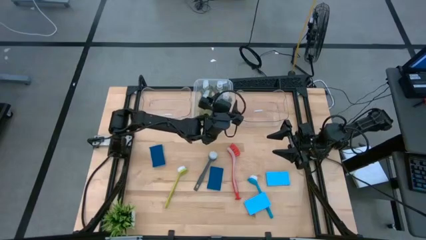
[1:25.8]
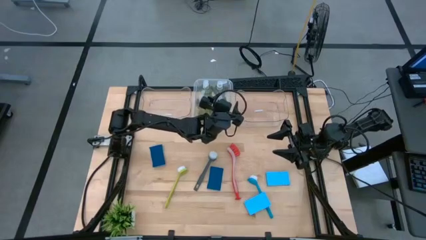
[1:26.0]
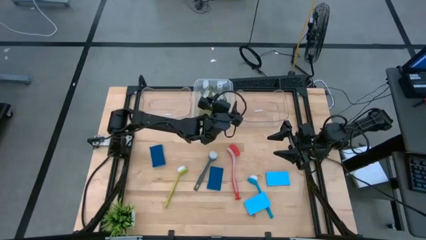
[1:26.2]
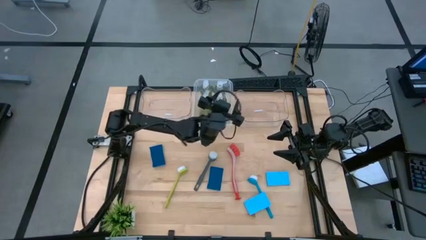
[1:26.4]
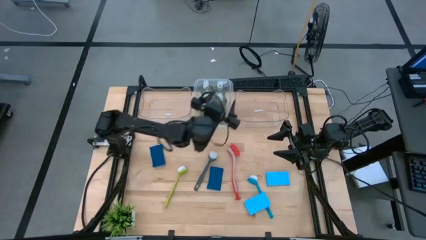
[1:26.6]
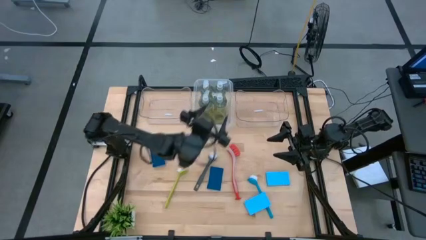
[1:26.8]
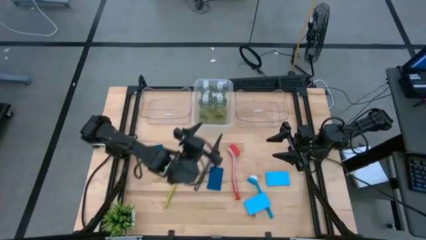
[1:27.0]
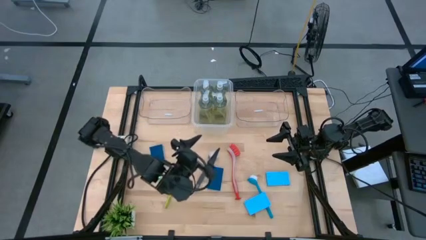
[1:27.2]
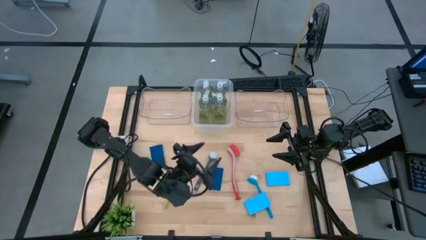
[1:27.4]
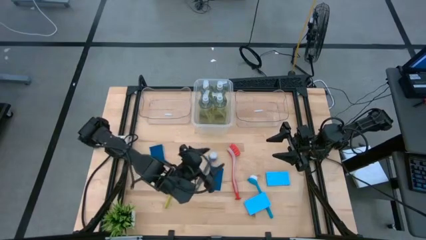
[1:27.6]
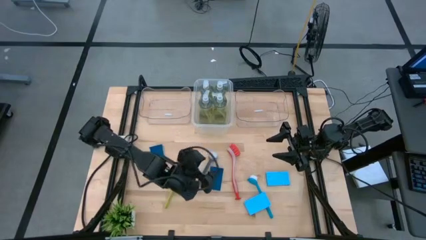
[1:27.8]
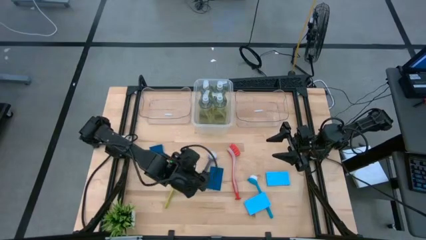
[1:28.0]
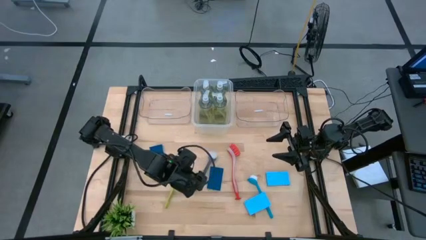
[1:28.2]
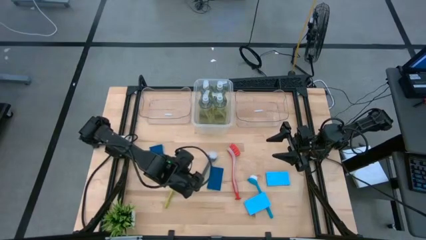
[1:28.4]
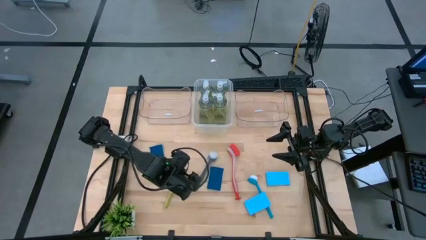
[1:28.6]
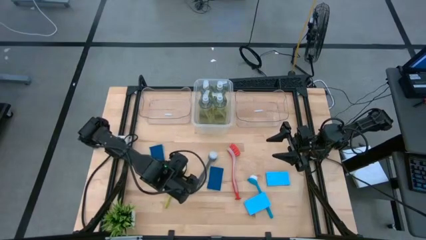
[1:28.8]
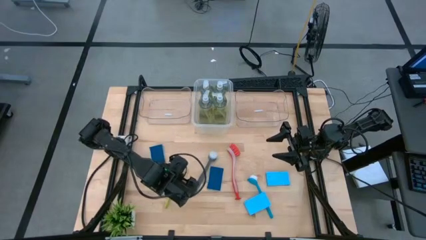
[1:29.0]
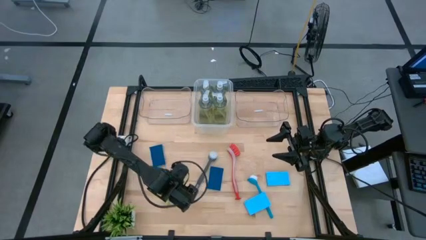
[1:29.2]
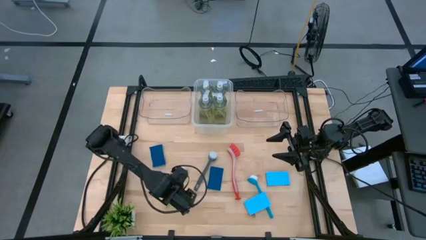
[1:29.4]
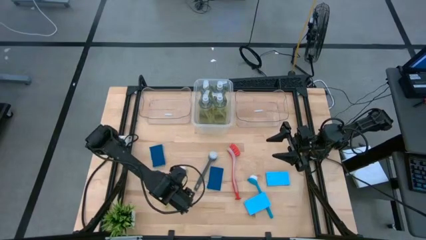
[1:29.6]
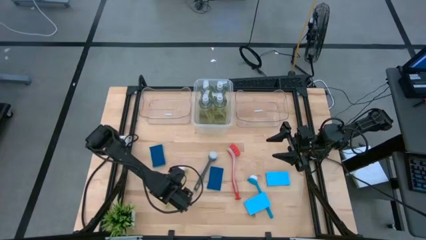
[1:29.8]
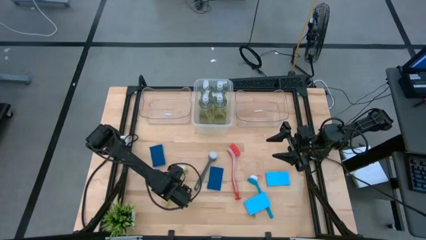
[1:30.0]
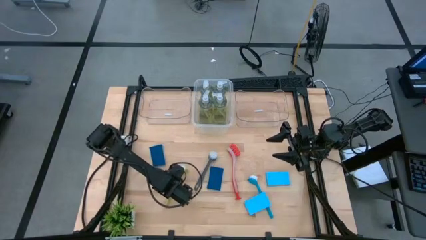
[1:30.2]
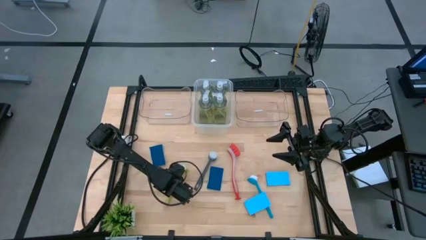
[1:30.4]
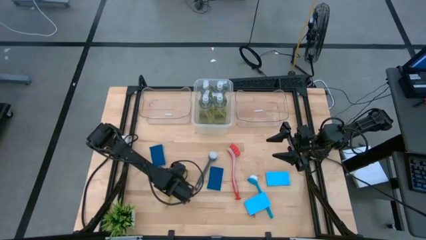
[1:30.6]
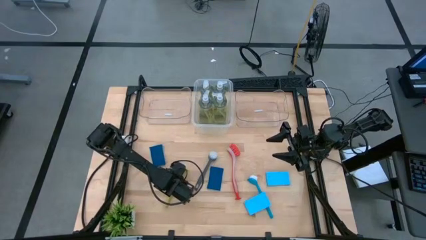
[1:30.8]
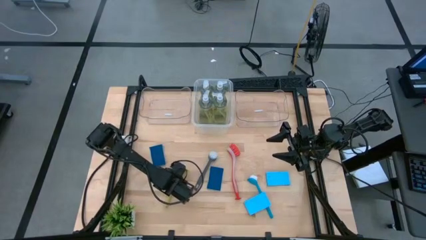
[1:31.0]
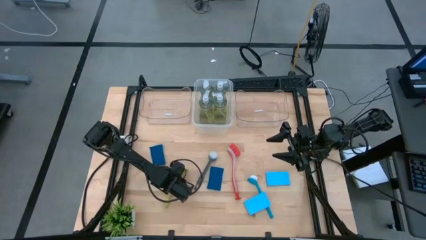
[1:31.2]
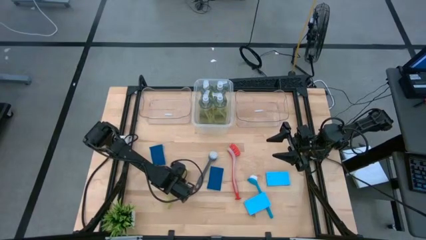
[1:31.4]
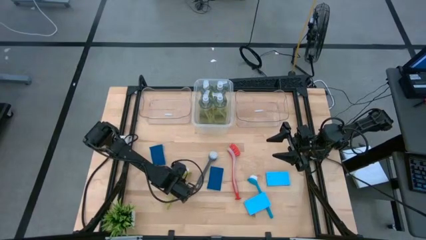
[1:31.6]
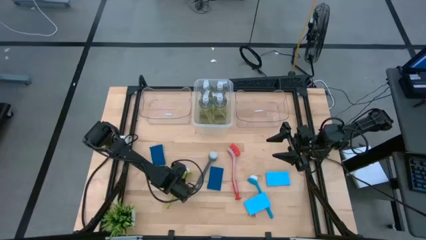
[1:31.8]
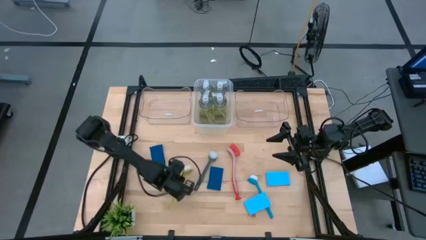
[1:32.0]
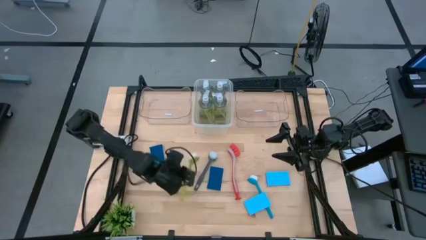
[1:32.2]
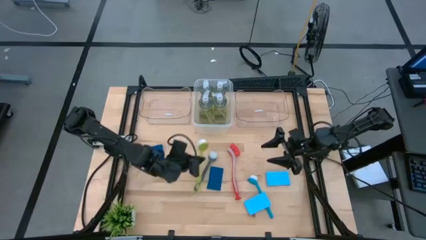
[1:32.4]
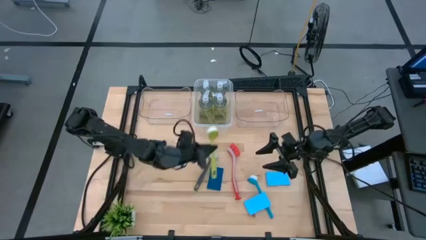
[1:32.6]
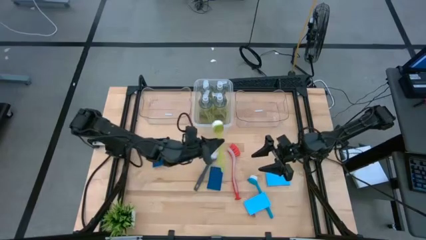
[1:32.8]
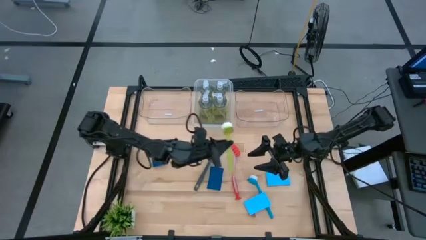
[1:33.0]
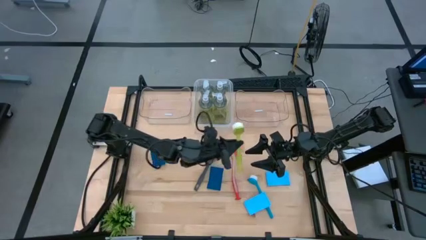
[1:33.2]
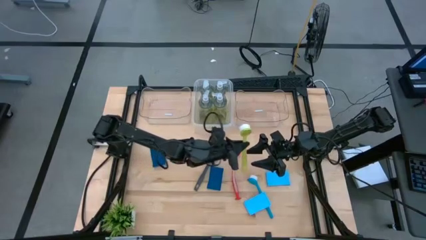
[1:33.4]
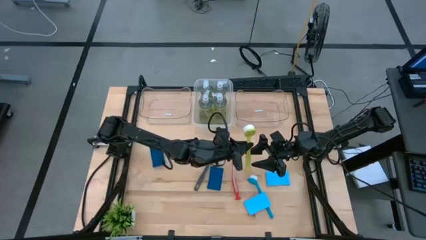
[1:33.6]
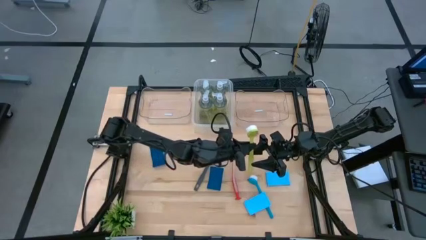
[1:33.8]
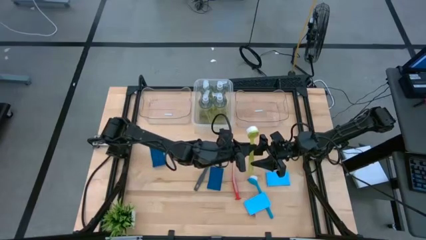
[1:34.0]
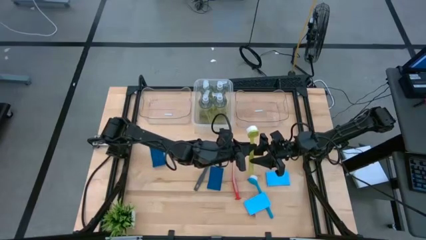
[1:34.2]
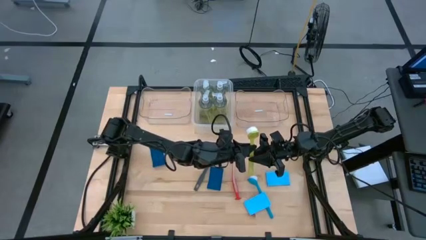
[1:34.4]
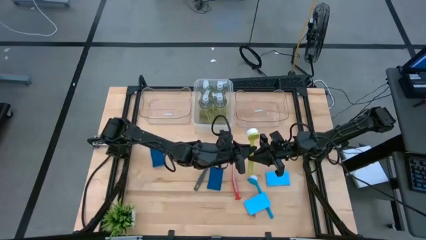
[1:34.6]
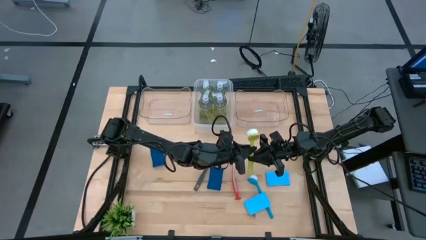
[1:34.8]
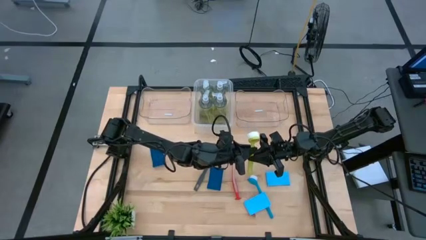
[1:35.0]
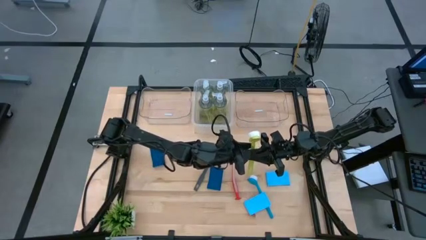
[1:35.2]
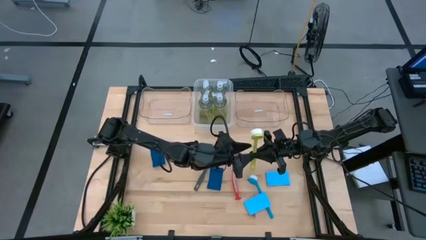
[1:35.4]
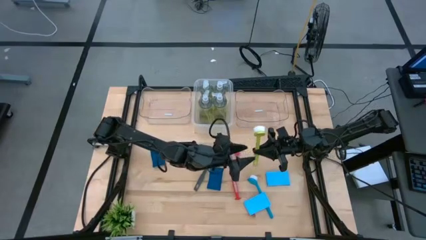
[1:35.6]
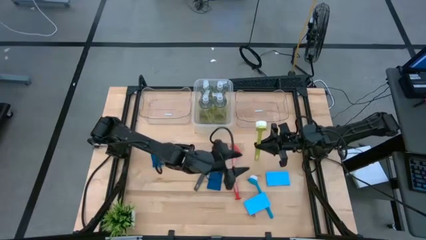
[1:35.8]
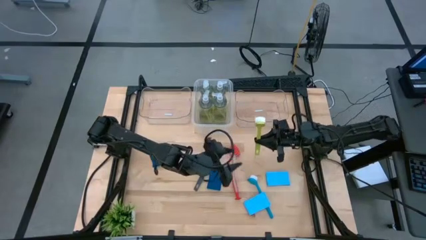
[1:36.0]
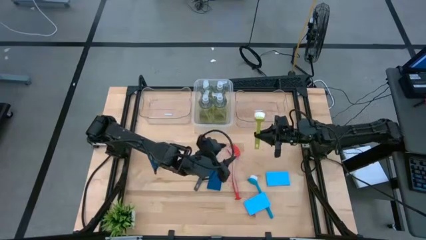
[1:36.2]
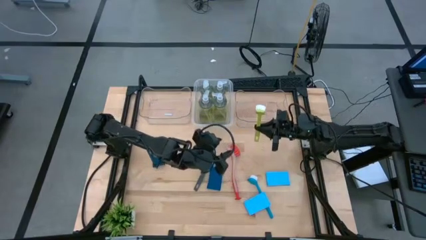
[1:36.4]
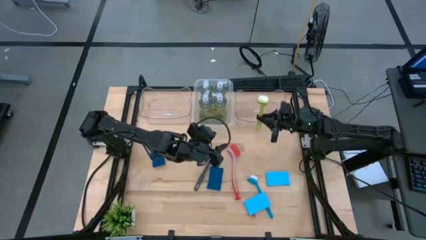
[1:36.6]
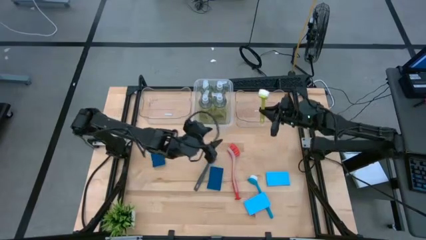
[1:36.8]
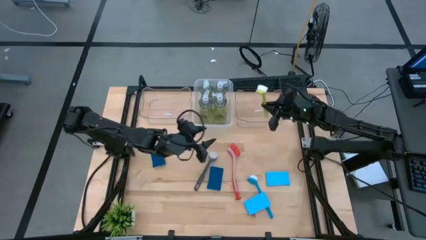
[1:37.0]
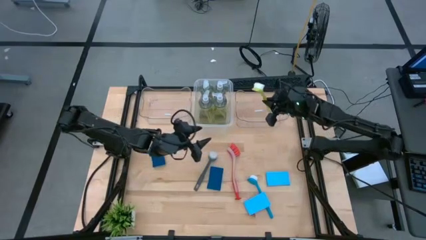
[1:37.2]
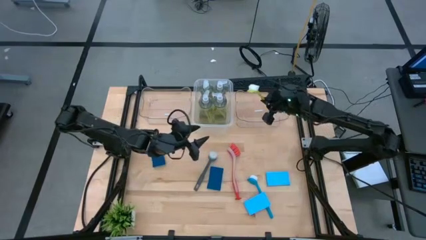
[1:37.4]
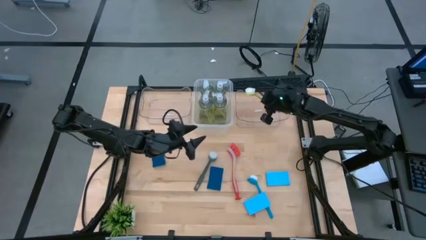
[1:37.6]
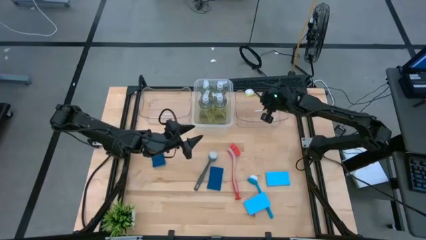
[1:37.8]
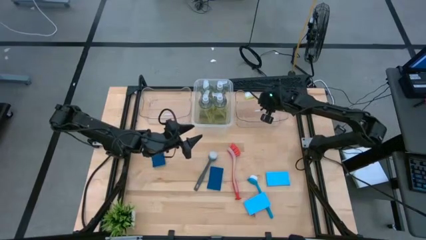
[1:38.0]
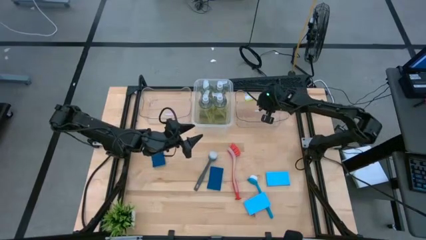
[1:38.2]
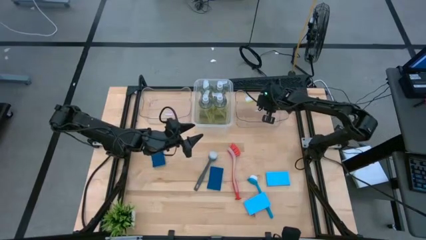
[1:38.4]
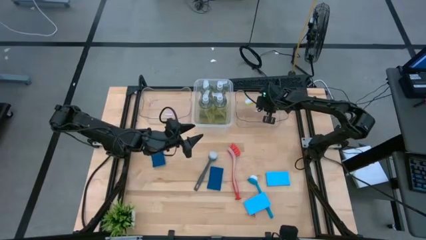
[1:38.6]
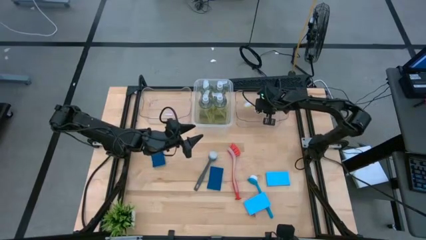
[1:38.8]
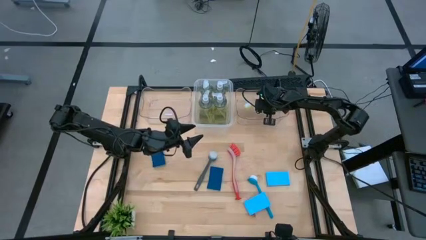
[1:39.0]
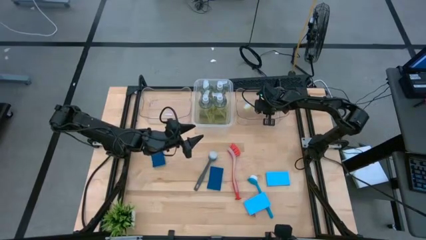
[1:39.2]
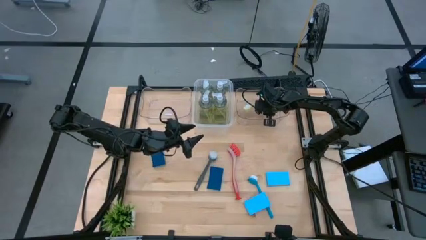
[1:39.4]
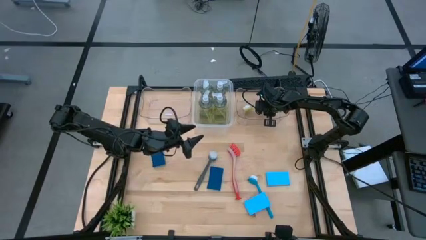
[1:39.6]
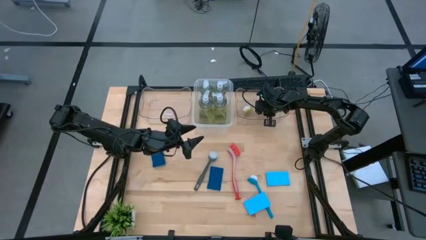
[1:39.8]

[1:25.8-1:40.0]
Task: Pick & Place Kitchen Sink Supplies
Put the green dish brush into the right transparent bin

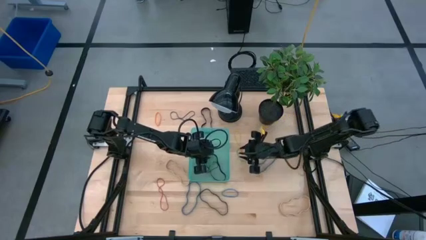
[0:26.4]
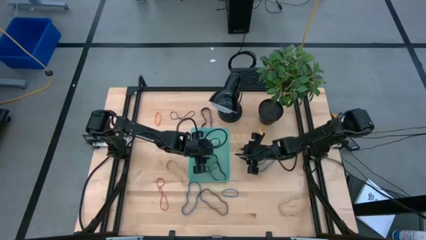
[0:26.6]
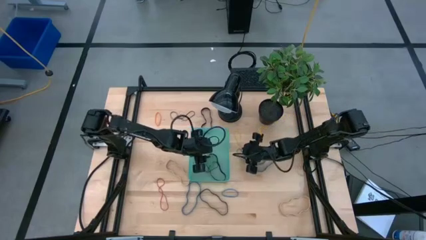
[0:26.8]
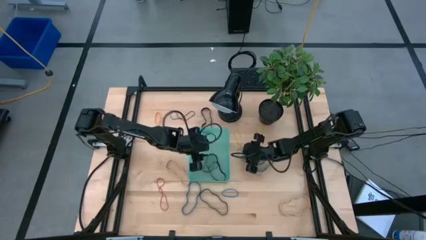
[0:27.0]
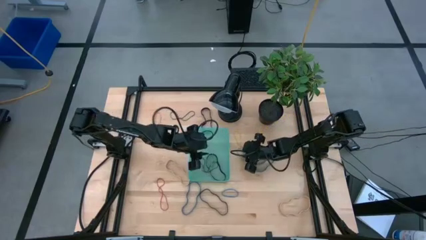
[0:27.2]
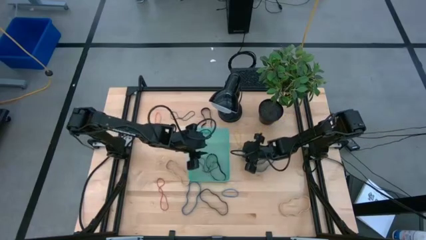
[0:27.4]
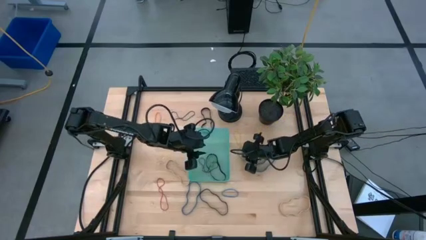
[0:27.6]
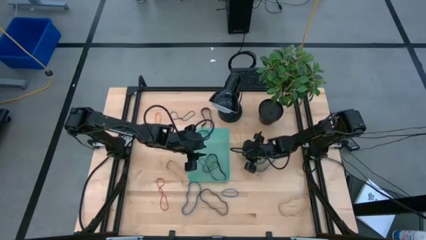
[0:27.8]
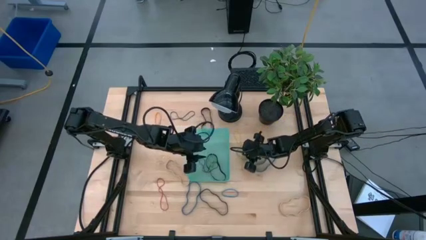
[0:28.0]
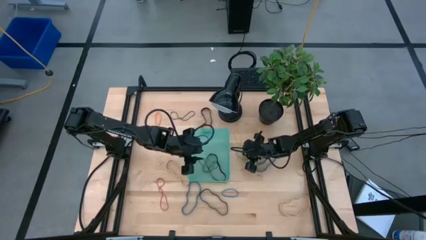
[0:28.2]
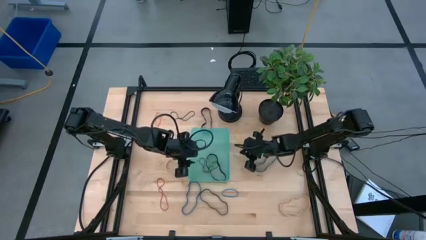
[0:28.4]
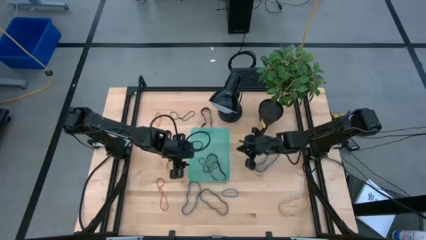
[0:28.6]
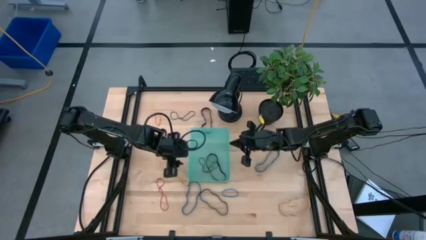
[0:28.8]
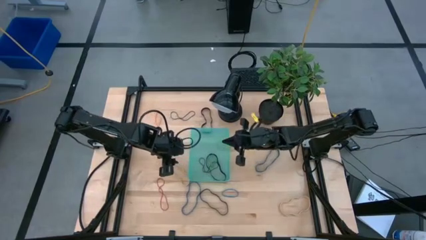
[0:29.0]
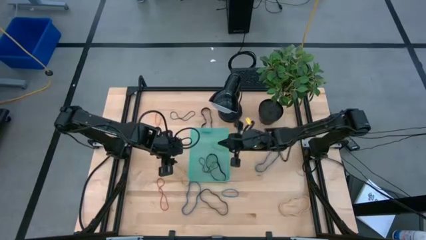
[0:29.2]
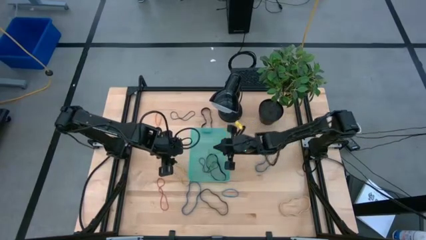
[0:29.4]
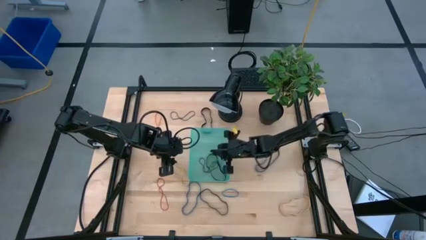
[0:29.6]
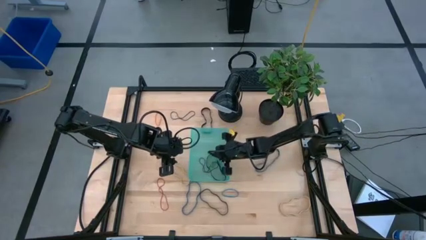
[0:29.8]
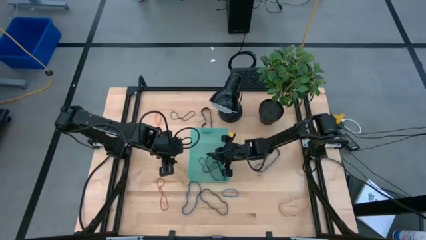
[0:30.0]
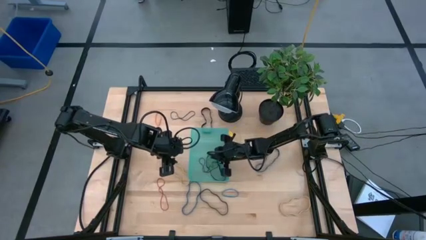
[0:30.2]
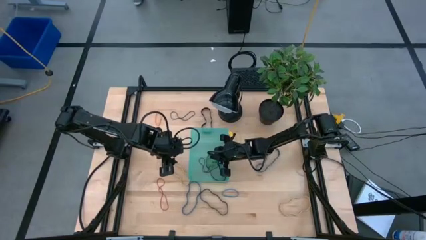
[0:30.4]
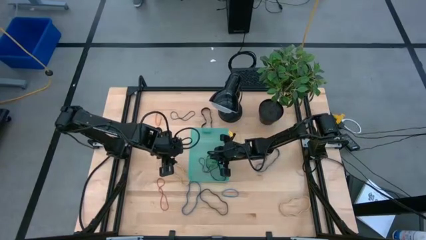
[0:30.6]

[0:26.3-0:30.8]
Task: Pick and place rubber bands into bin
Put the green rubber band into the basket
